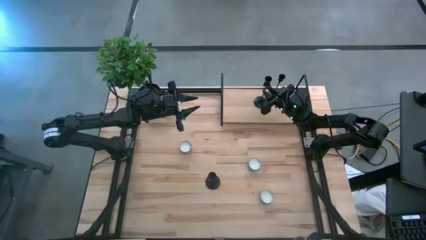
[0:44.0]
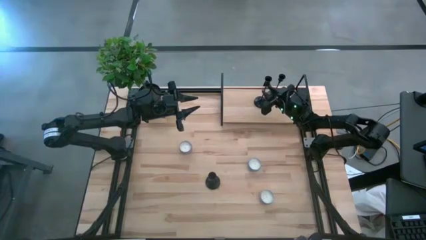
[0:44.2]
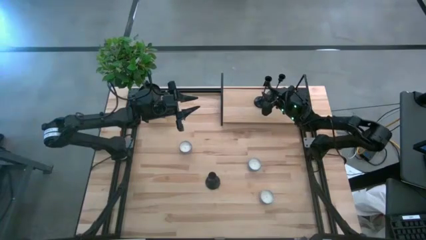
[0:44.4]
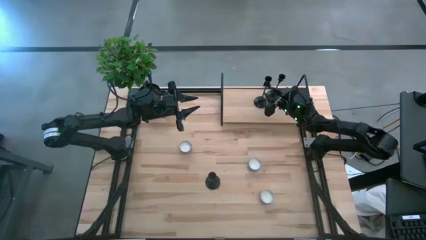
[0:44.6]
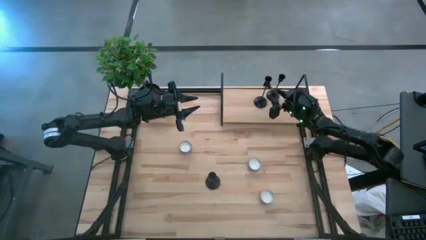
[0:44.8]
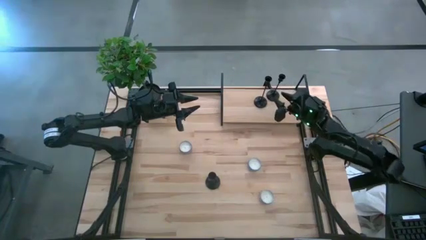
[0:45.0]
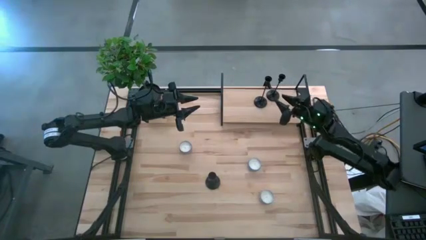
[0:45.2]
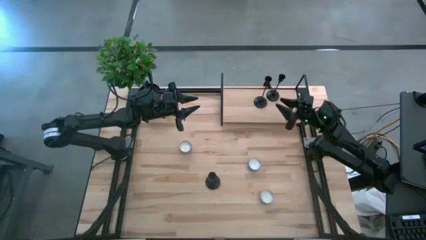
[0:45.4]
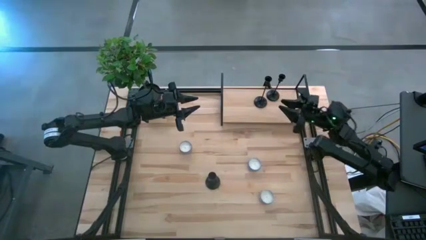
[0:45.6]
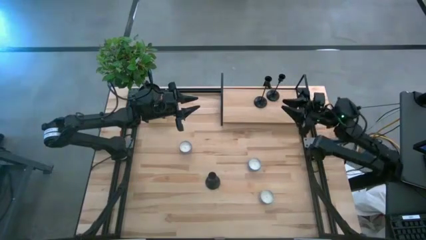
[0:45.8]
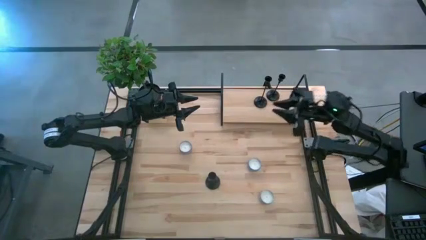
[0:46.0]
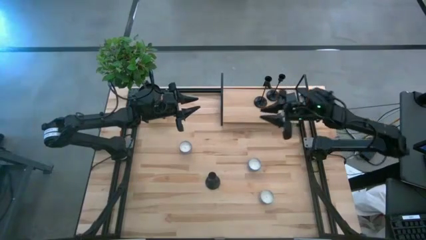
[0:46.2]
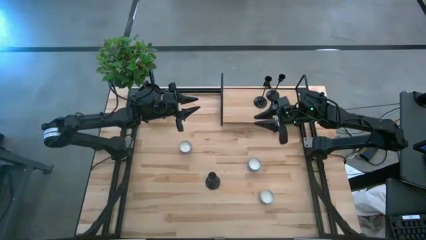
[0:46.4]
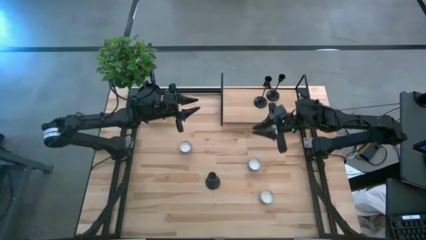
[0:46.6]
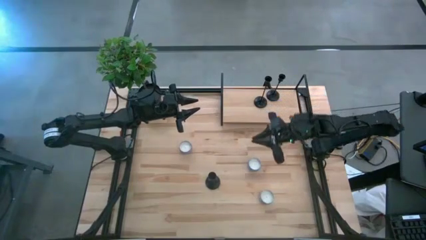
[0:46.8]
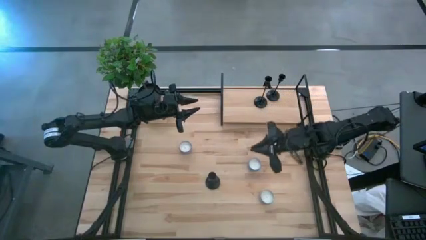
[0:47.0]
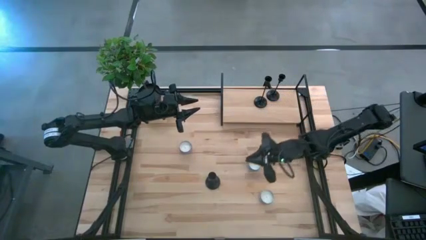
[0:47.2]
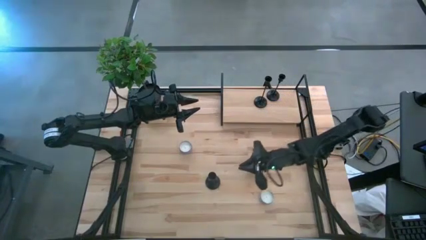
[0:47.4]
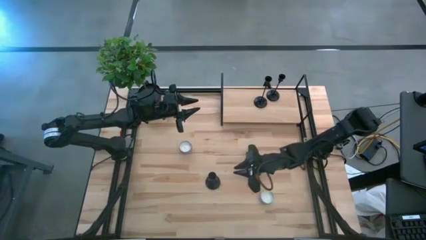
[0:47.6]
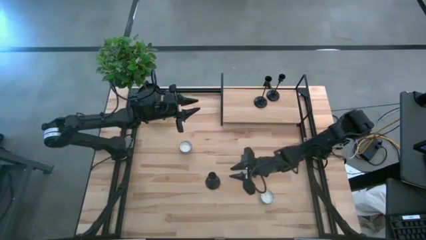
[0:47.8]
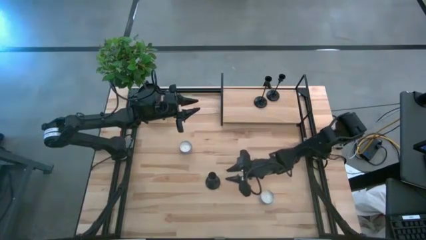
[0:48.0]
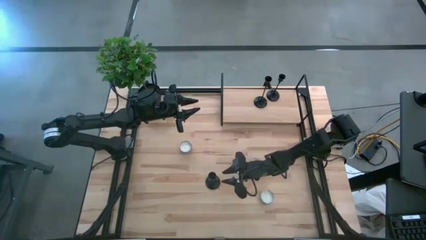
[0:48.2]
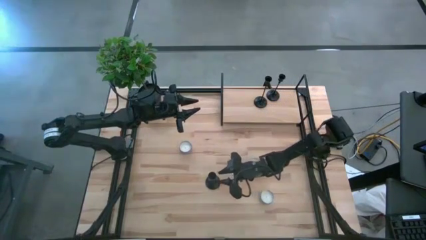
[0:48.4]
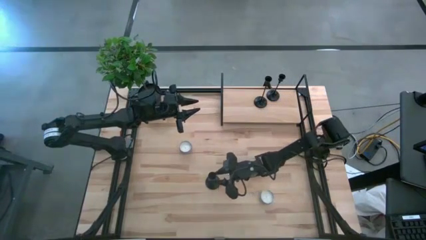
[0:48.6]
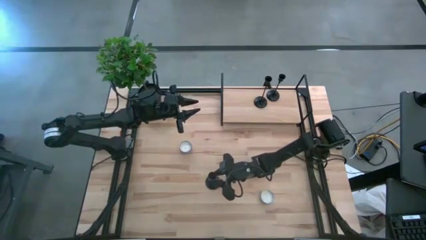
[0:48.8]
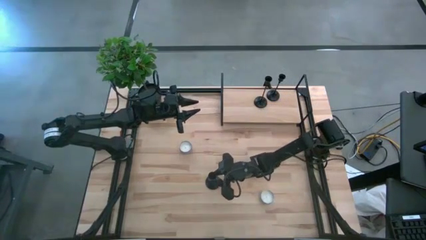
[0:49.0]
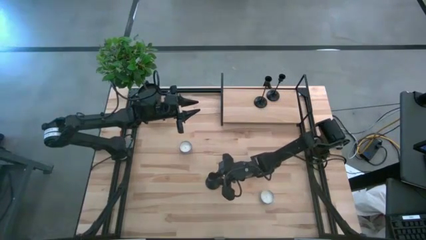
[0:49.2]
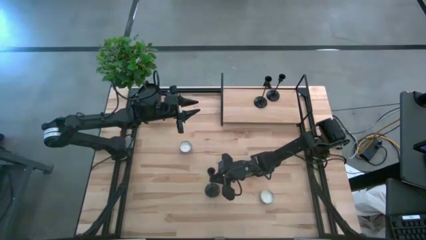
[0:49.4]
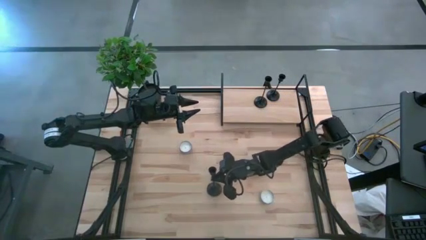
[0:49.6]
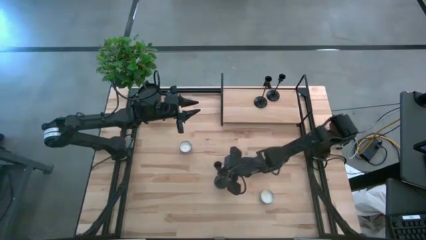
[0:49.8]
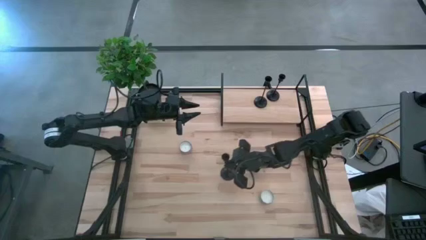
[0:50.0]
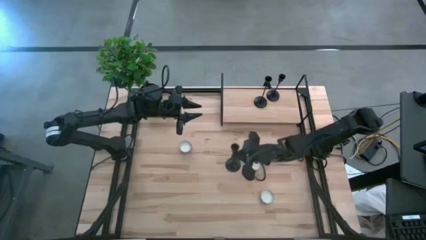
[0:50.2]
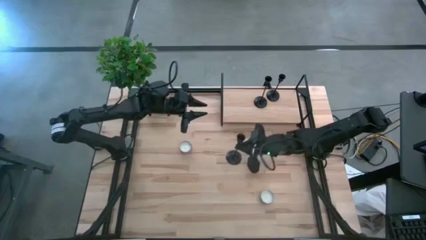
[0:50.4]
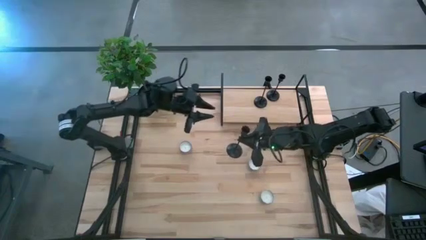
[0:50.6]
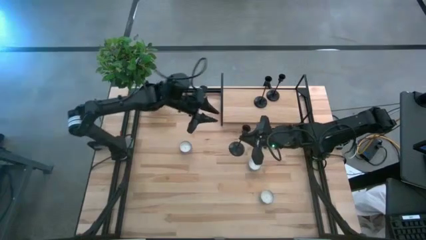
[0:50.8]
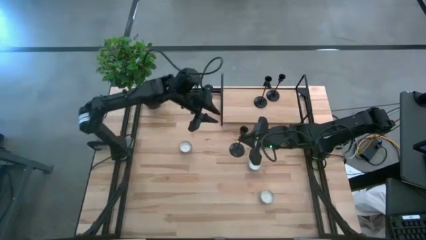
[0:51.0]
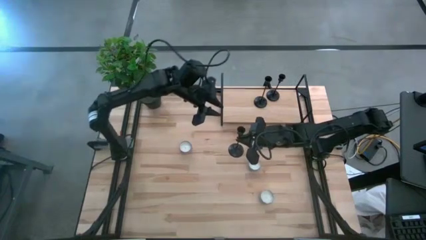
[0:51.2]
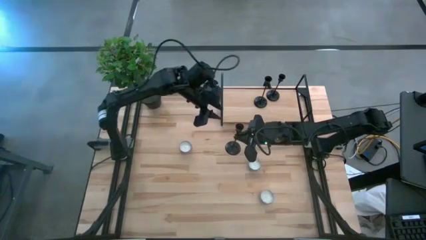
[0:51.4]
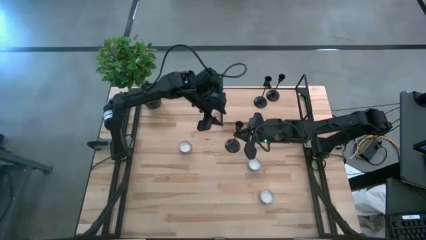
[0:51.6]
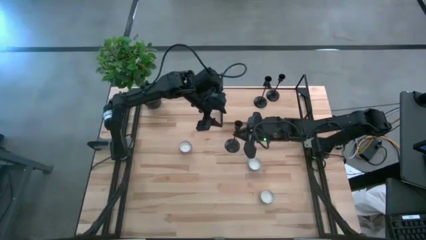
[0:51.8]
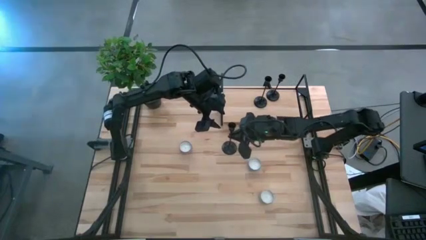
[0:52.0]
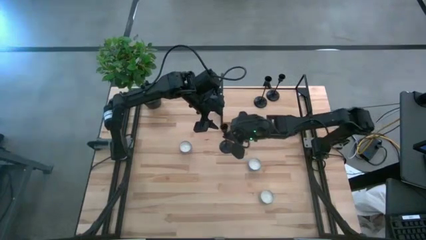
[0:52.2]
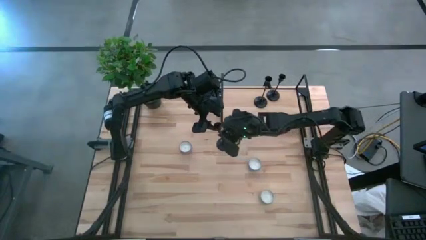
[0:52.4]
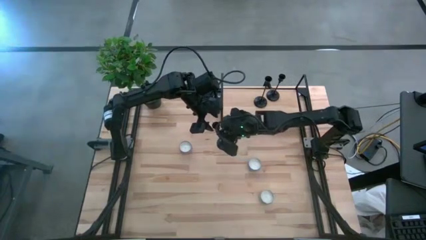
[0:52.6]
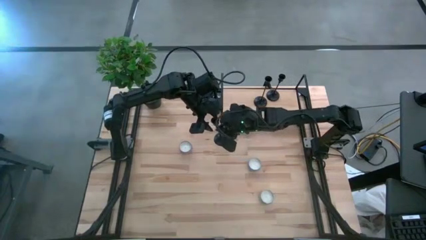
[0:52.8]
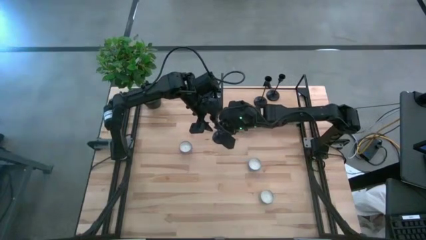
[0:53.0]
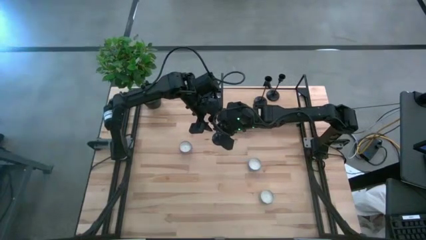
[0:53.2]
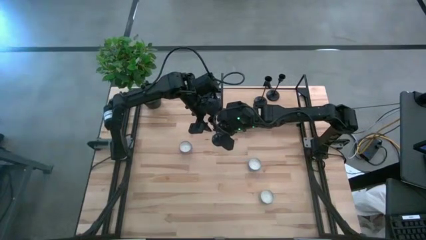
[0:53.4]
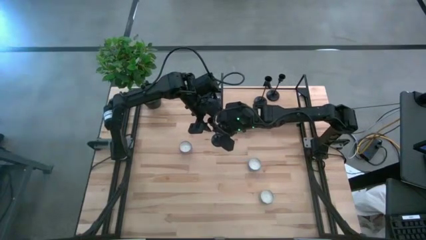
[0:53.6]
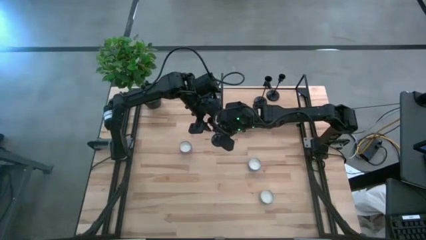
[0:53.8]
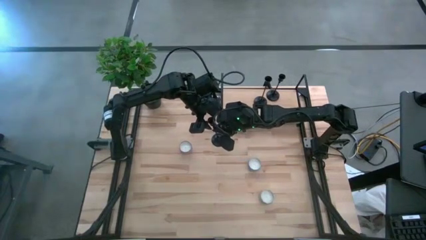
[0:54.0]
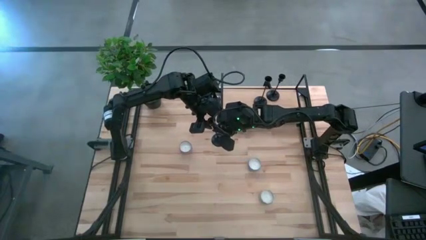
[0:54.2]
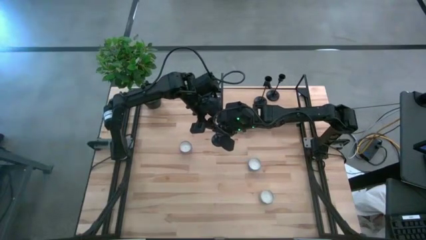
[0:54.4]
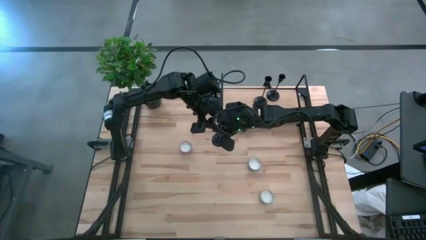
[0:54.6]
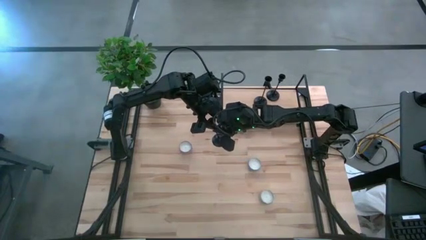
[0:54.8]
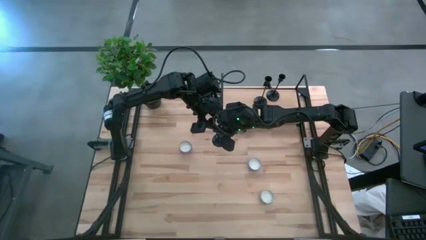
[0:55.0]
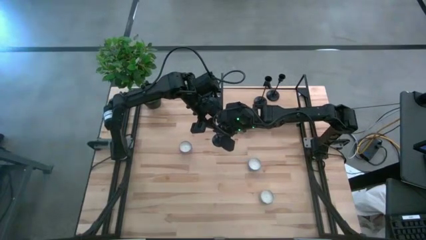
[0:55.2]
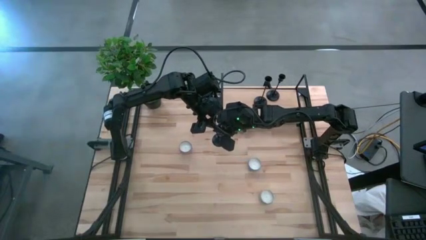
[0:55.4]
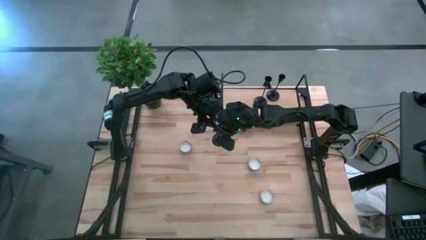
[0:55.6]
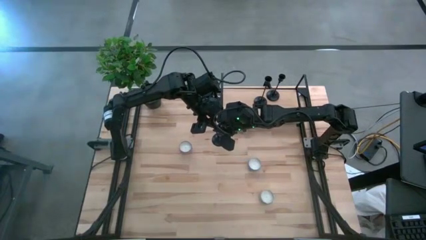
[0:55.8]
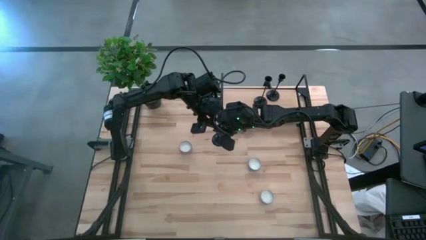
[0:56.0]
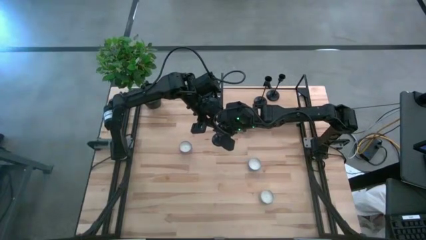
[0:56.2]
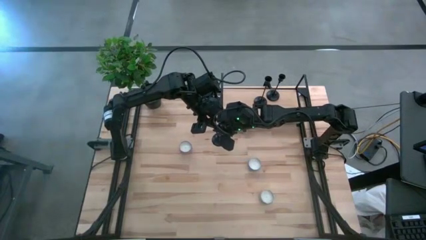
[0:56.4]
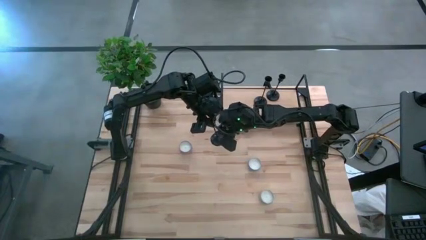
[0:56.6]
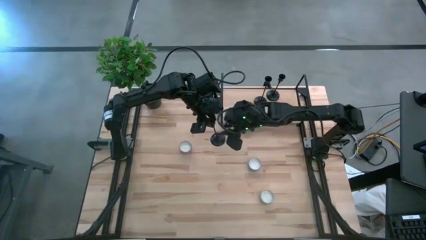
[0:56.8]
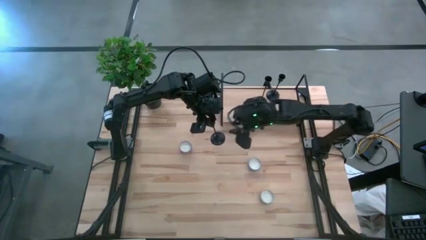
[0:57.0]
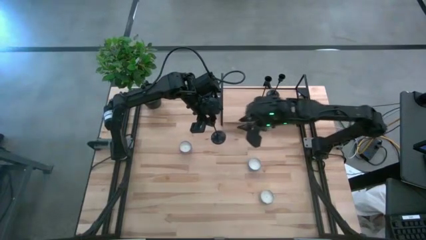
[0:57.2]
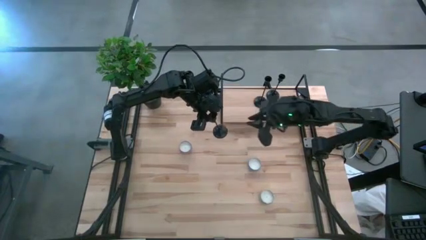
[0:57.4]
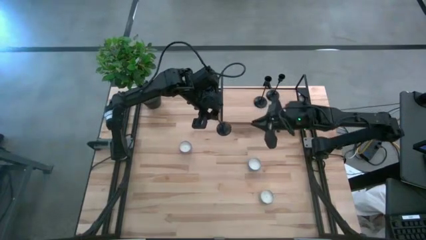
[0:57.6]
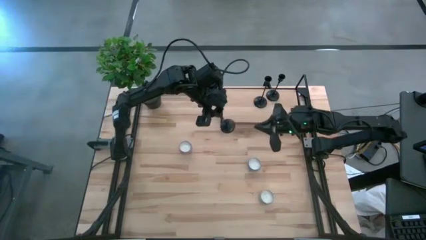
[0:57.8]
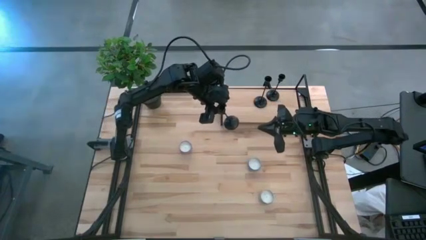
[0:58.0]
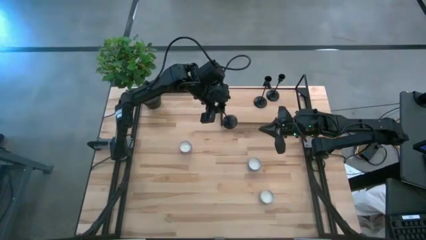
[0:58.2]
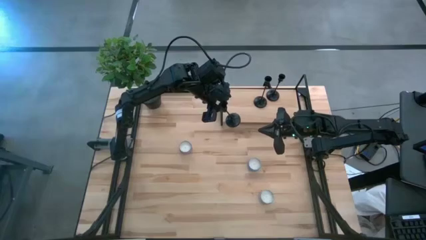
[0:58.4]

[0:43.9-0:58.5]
Task: Pick & Place candle stick holders
Put the black candle holder on the shelf
